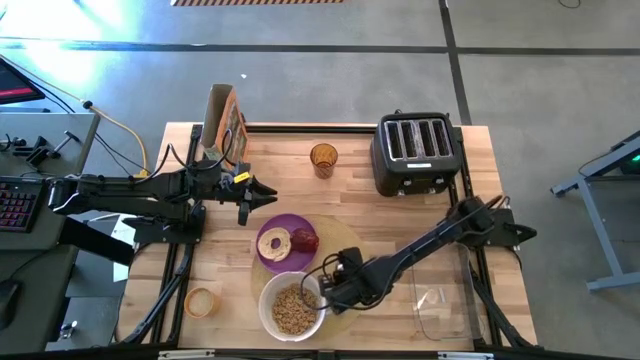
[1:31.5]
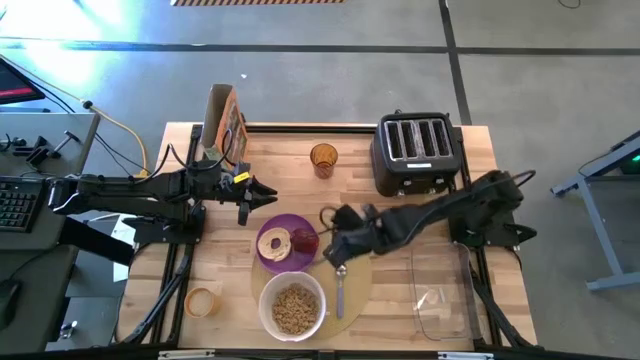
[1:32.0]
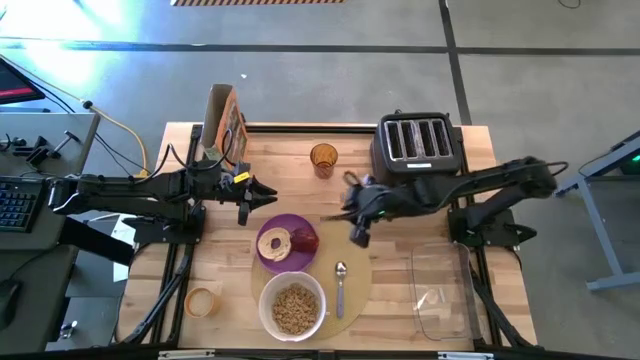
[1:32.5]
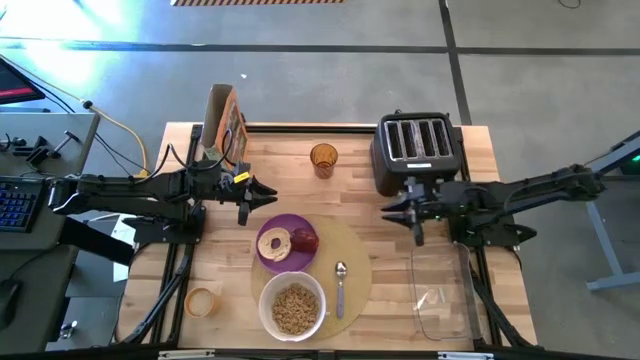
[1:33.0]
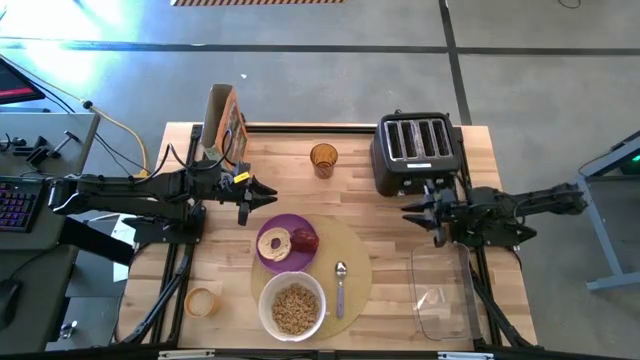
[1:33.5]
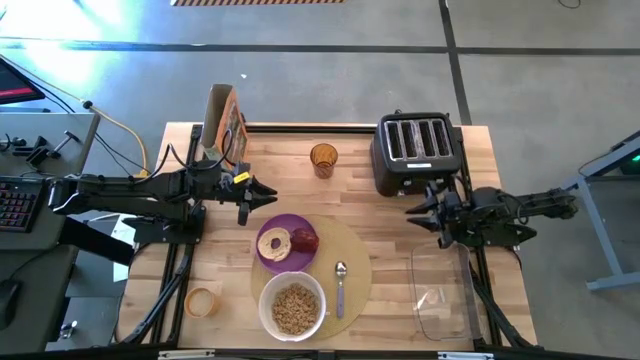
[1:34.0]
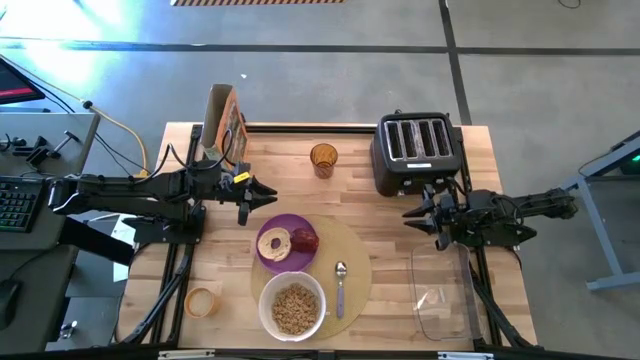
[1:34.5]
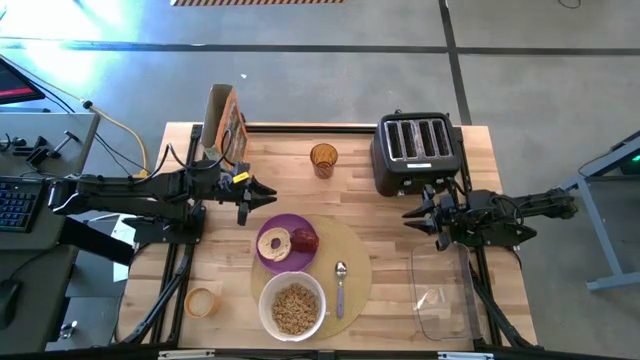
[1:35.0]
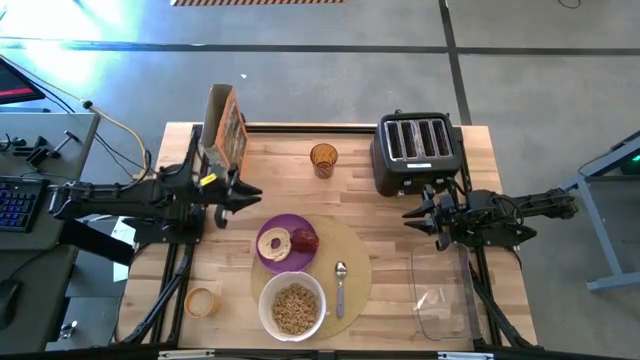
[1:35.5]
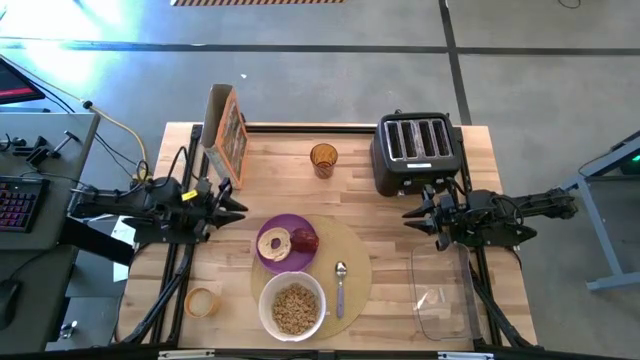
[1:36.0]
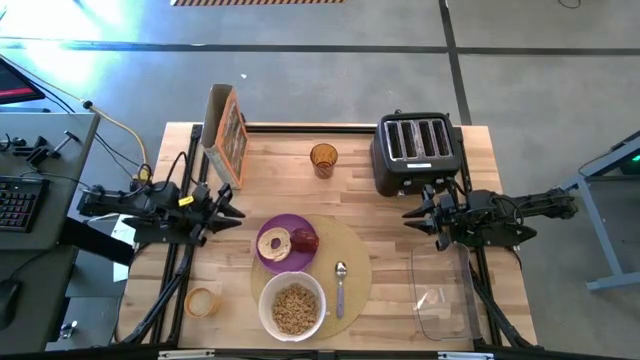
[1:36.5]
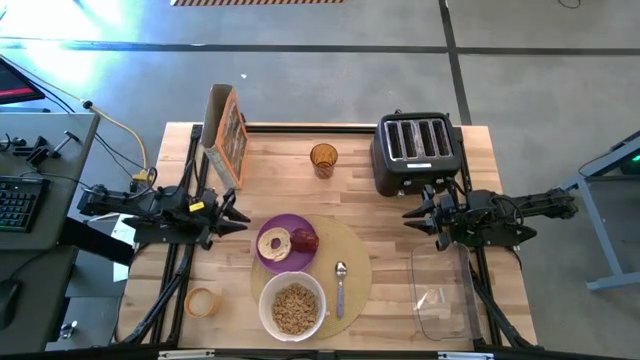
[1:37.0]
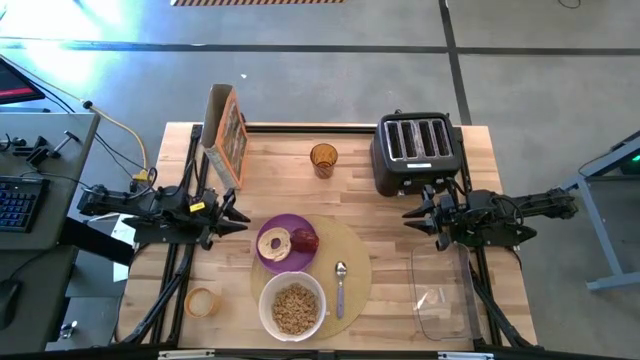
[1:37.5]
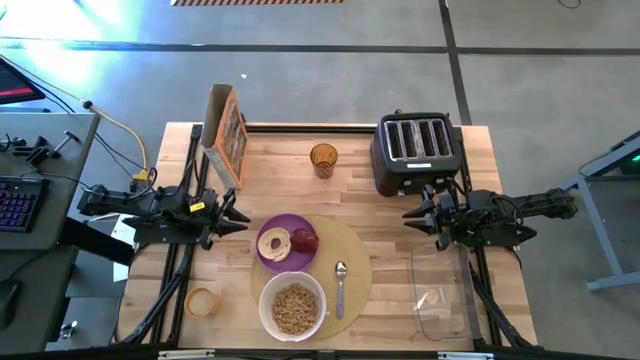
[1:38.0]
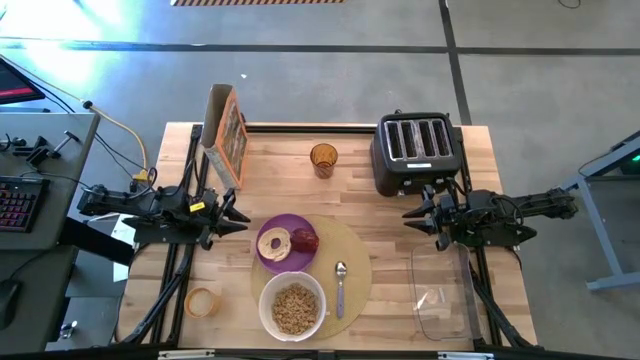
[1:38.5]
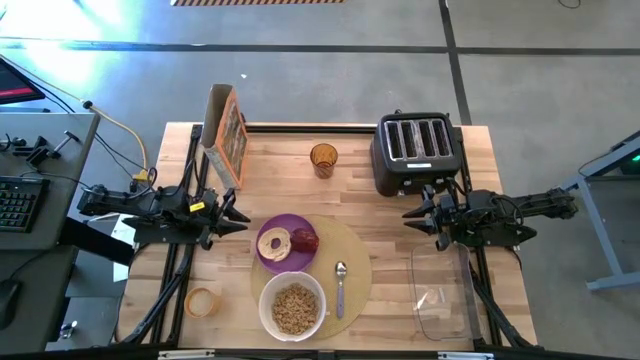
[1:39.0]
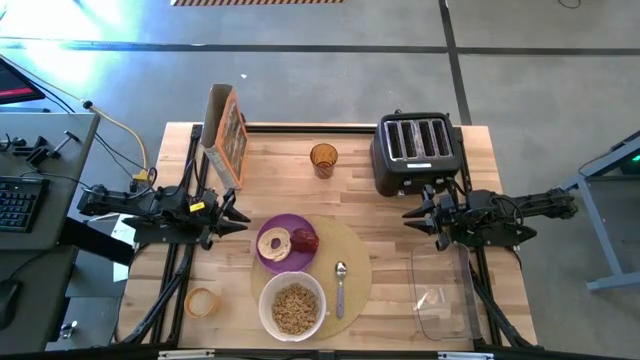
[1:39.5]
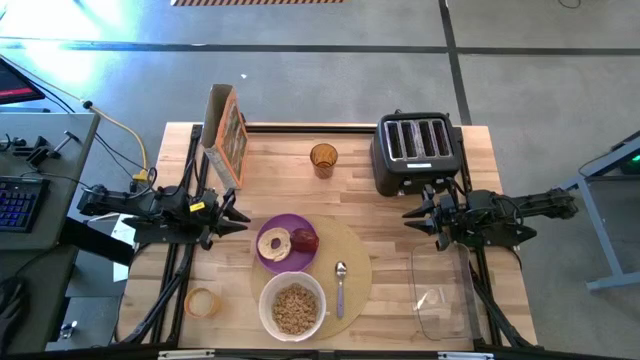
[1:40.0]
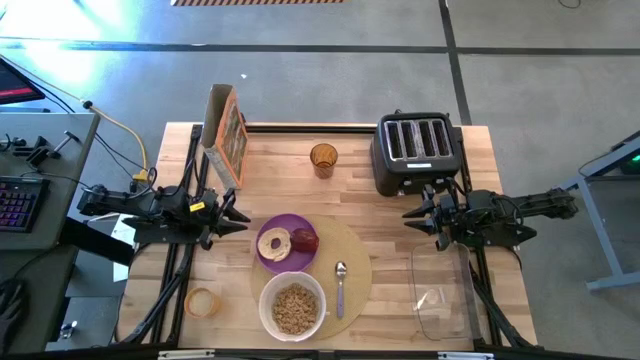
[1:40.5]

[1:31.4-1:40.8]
Task: Arrange a breakfast setting
Return to Home Position

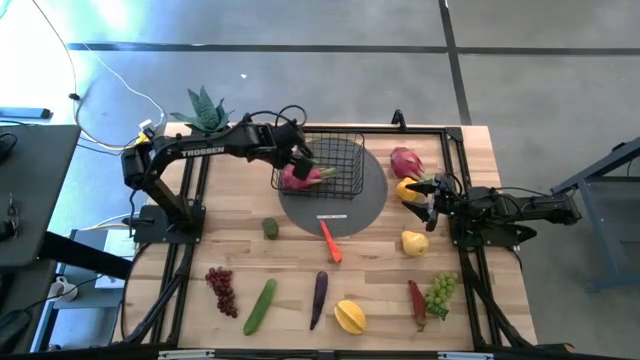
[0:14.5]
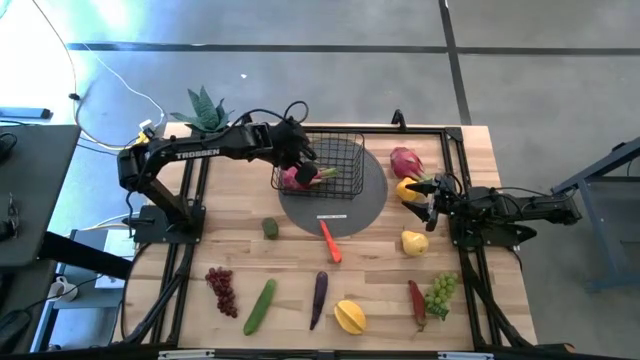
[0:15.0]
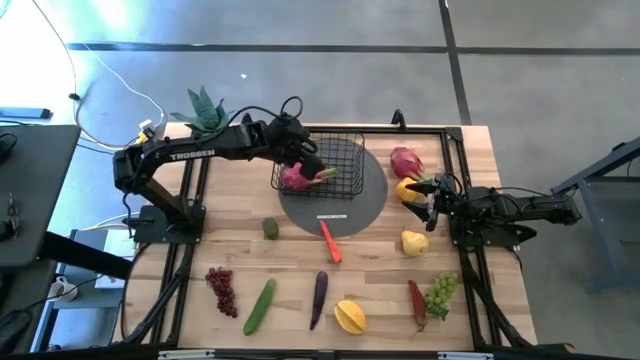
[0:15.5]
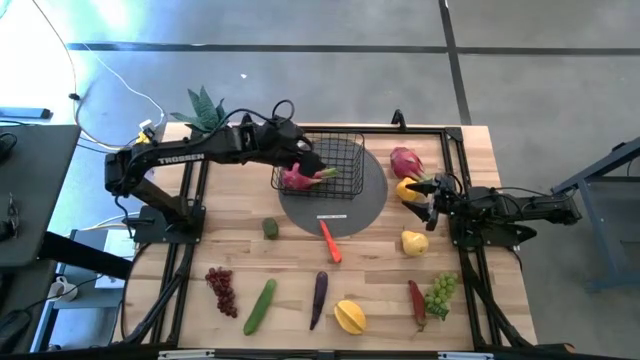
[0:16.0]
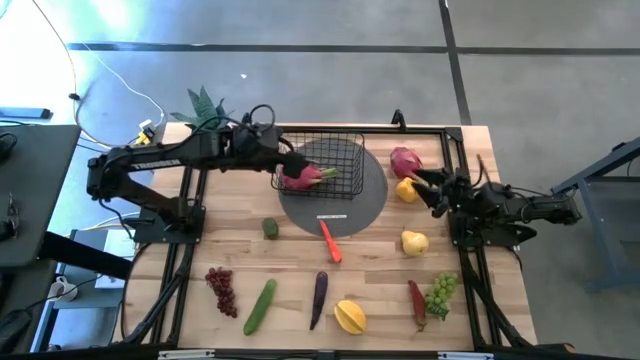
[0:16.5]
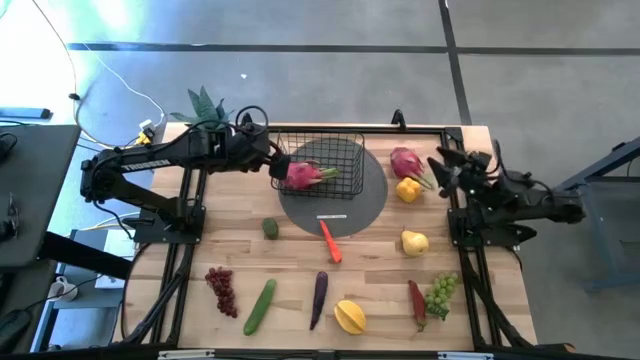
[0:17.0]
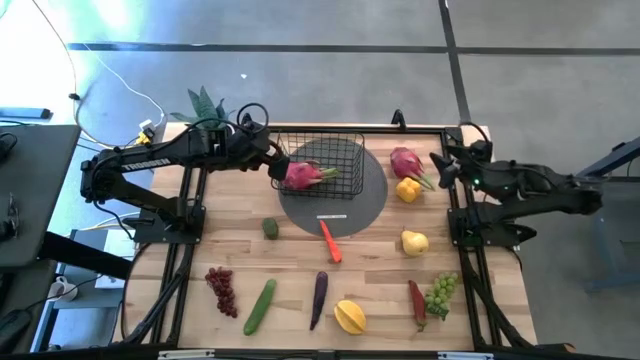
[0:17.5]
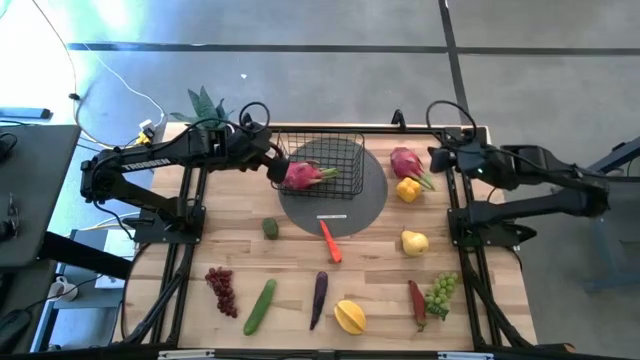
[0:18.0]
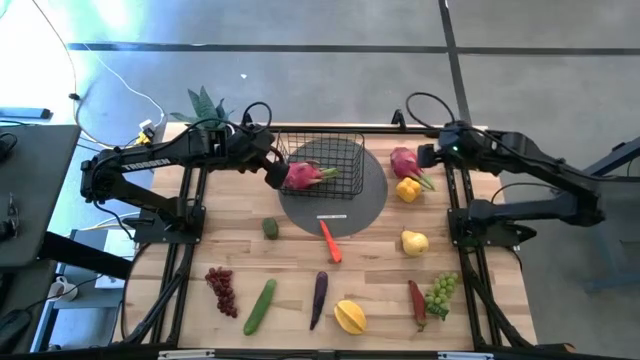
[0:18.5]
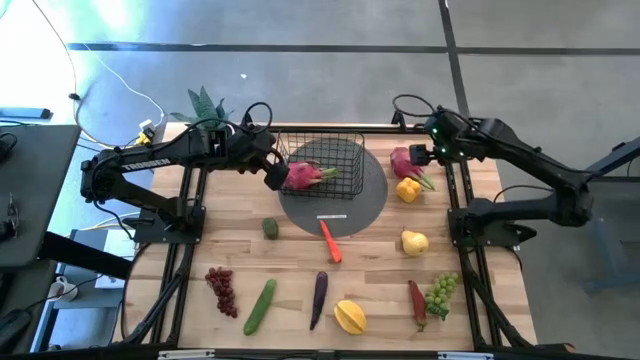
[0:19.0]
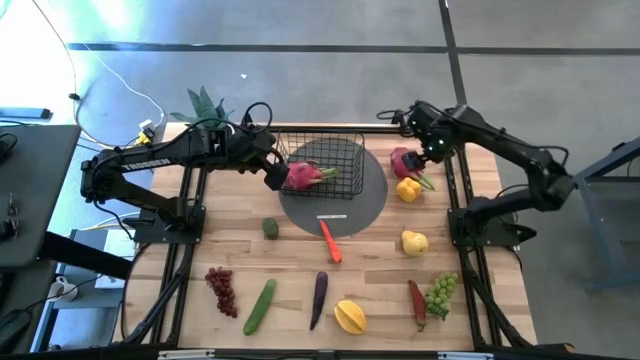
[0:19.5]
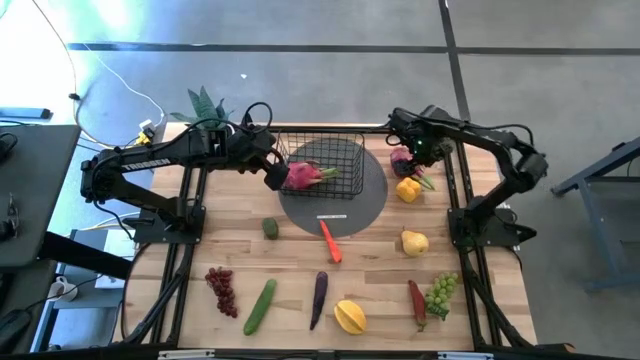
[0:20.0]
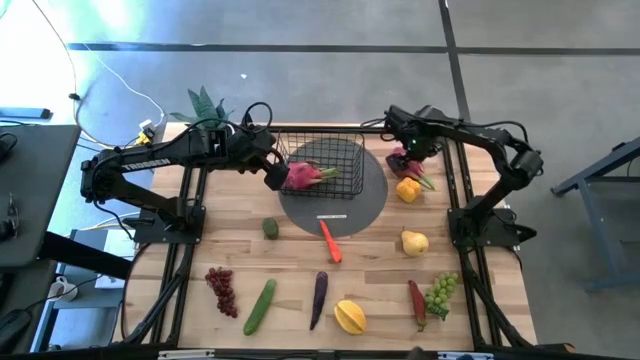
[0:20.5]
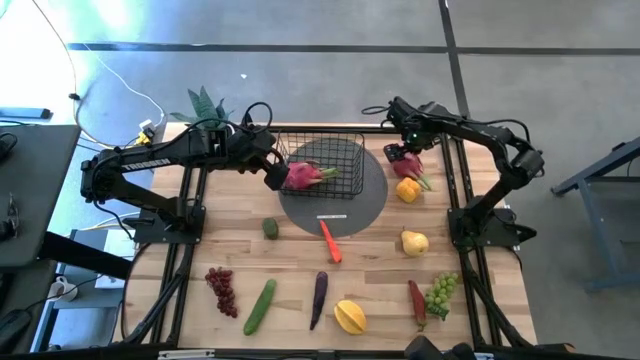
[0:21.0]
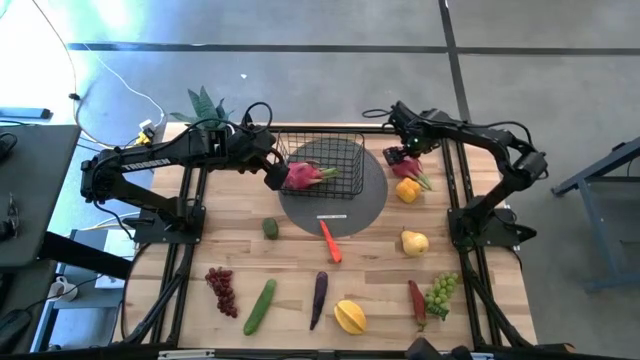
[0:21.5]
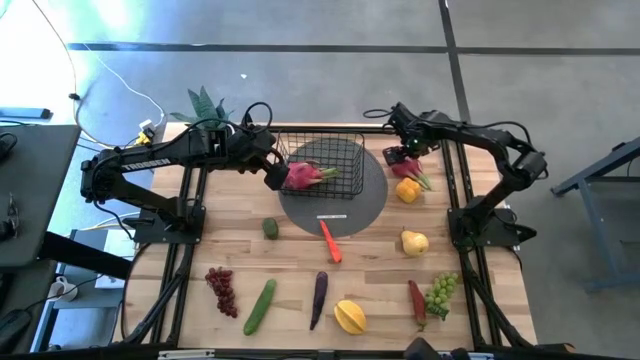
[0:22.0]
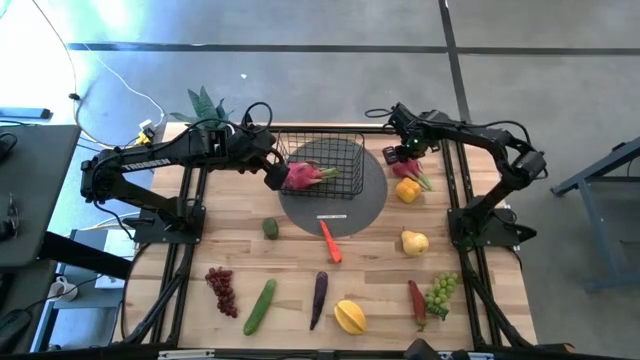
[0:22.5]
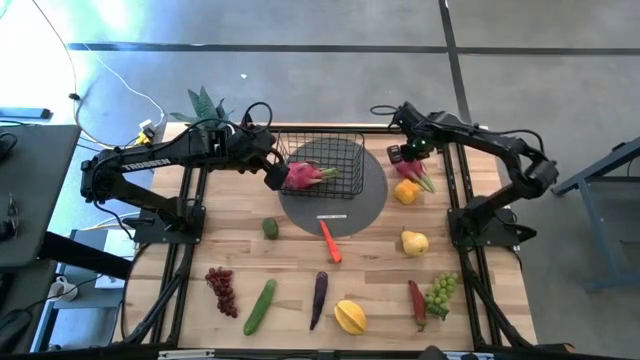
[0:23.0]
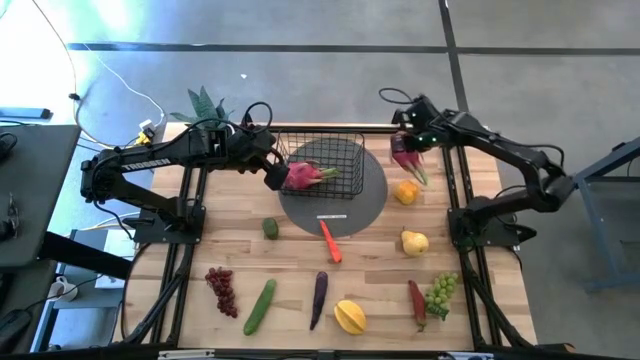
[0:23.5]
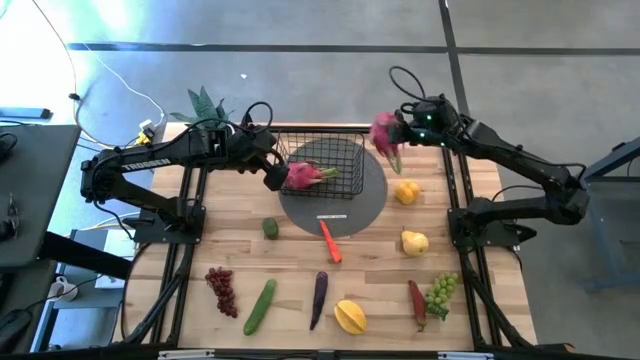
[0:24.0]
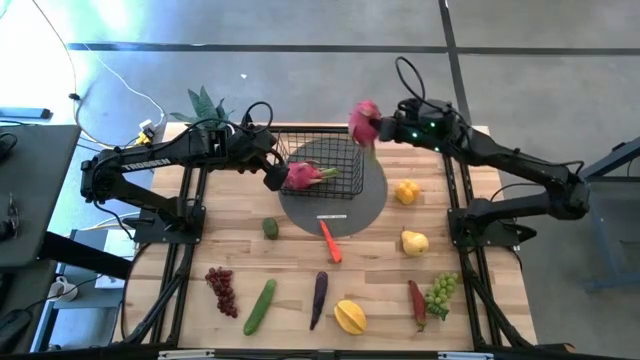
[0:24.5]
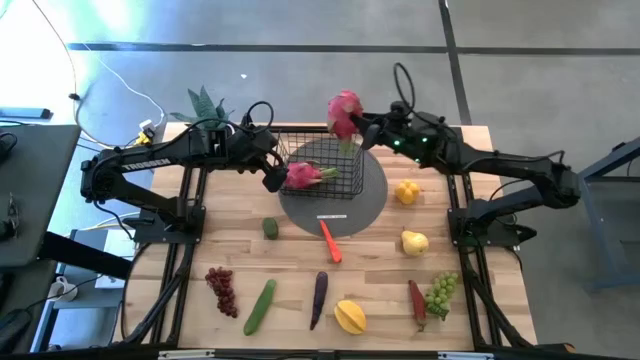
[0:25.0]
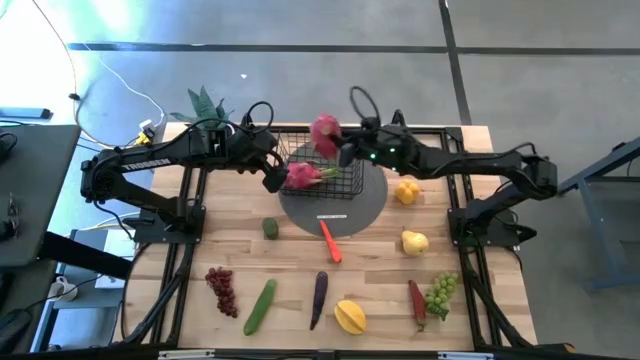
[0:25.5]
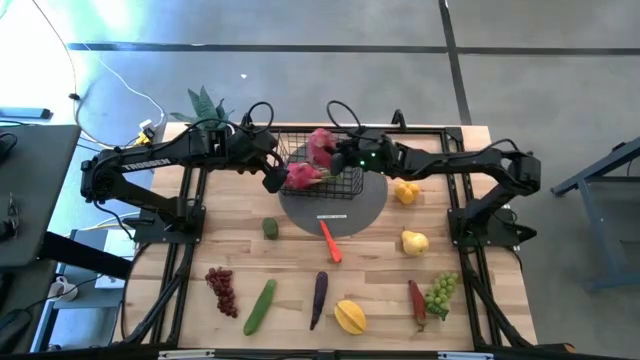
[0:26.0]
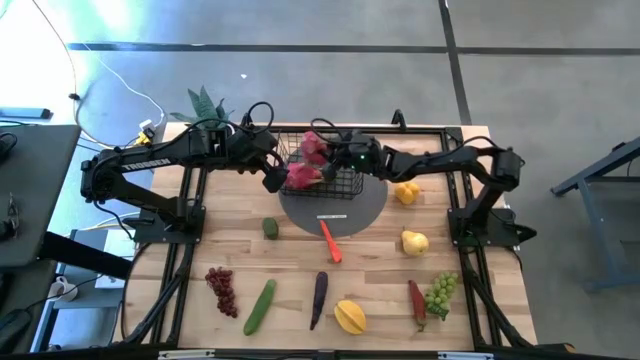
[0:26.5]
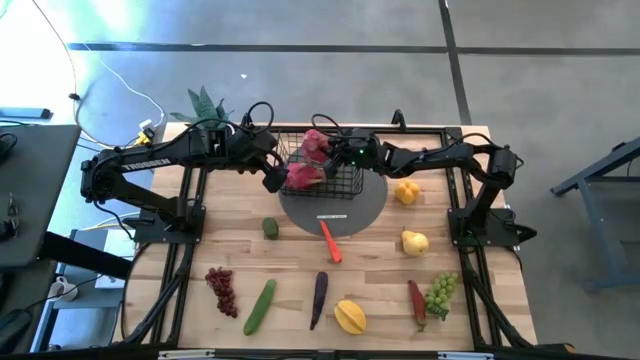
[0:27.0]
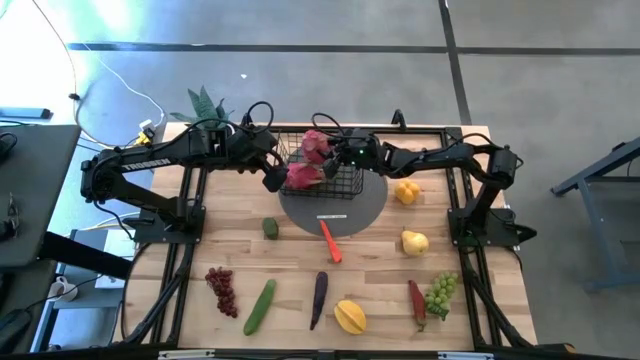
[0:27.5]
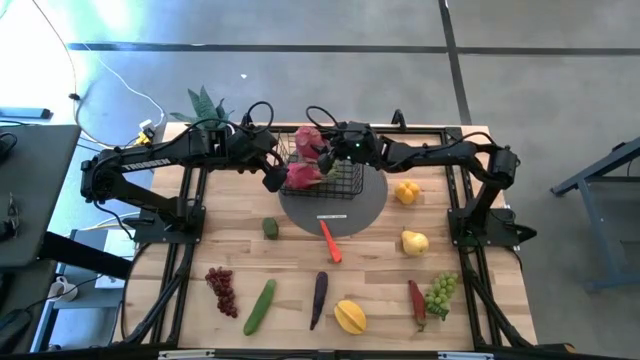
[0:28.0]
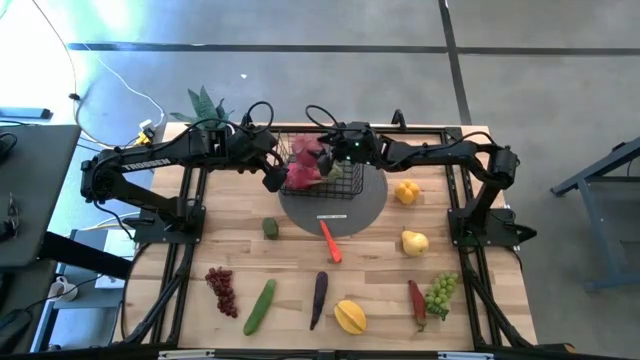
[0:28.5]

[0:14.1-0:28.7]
Task: Build produce basket
Put the pink dragon fruit into the black wire basket
